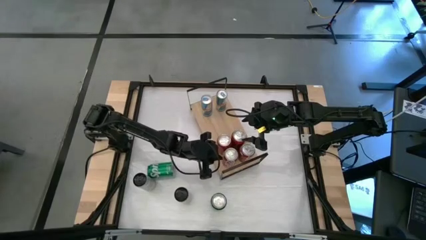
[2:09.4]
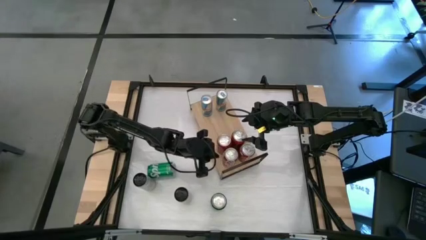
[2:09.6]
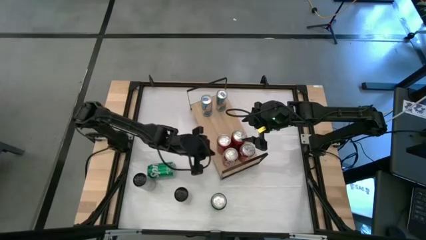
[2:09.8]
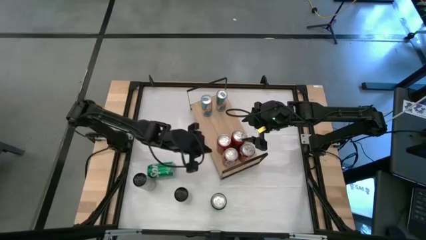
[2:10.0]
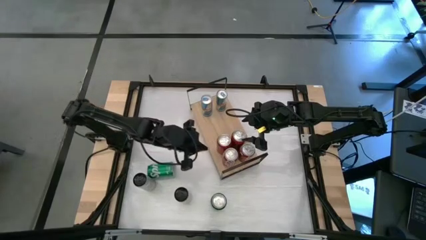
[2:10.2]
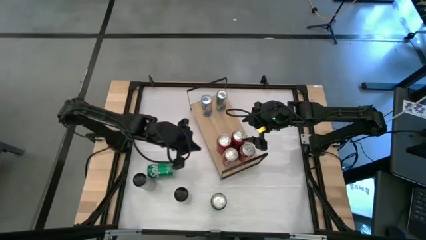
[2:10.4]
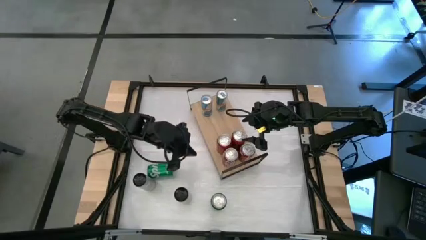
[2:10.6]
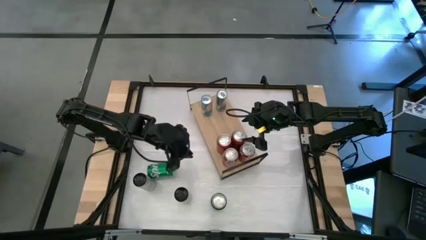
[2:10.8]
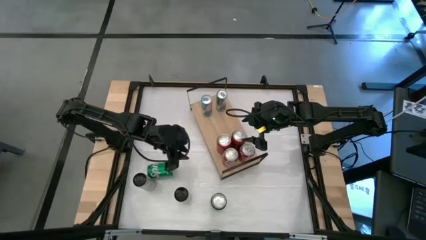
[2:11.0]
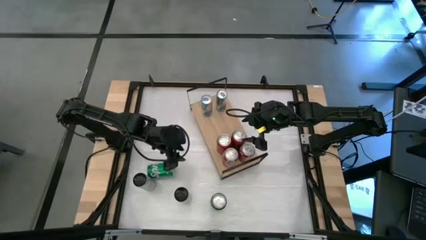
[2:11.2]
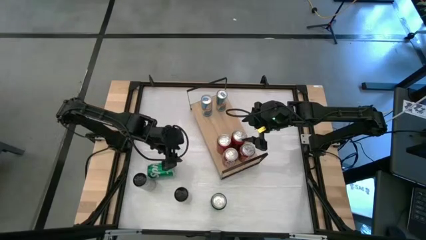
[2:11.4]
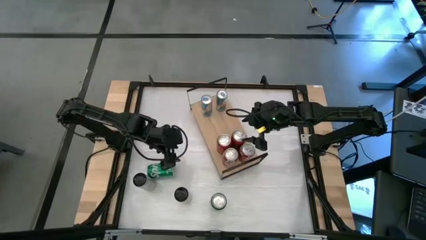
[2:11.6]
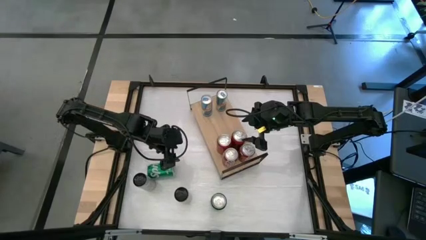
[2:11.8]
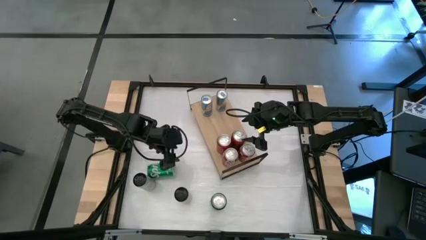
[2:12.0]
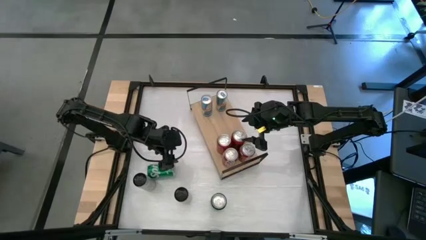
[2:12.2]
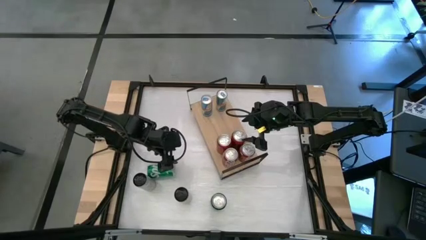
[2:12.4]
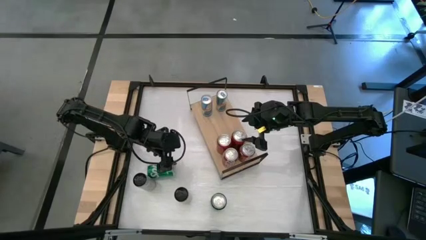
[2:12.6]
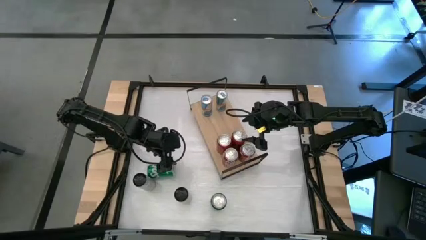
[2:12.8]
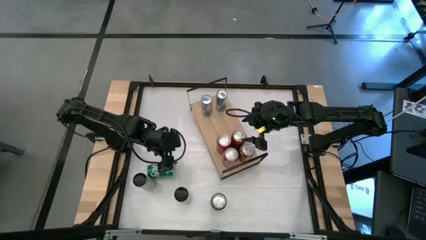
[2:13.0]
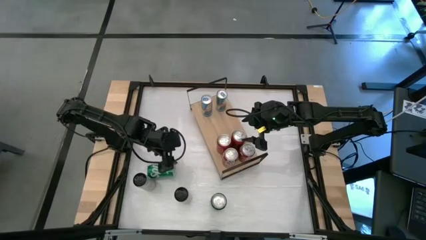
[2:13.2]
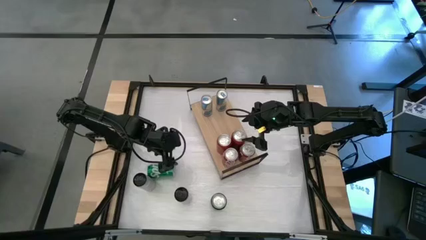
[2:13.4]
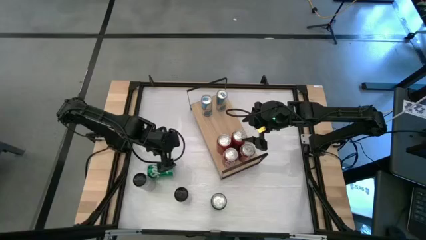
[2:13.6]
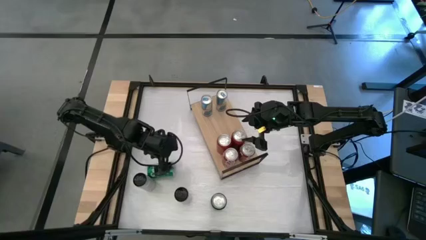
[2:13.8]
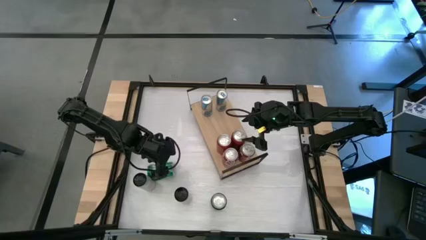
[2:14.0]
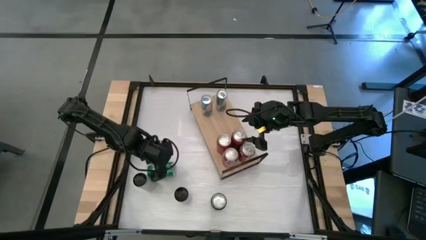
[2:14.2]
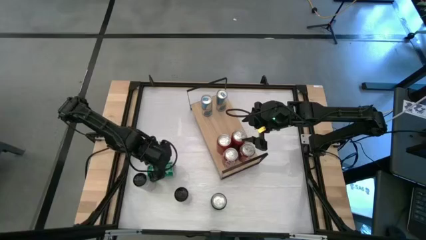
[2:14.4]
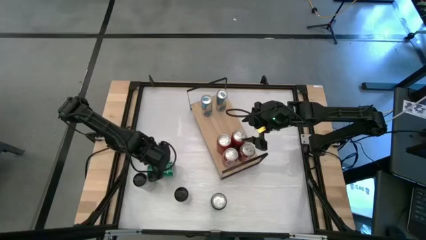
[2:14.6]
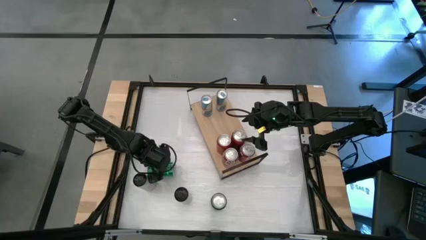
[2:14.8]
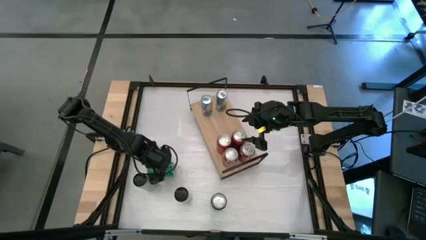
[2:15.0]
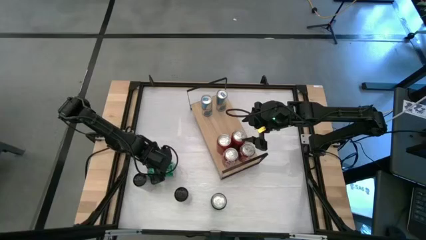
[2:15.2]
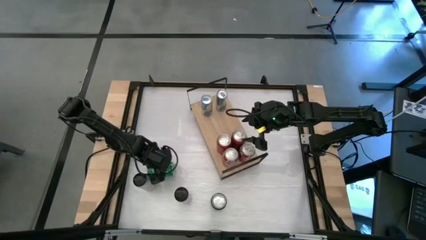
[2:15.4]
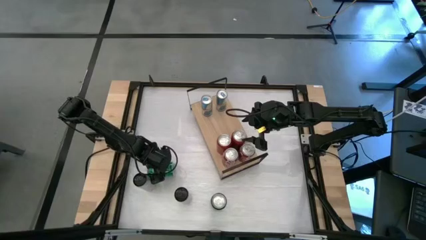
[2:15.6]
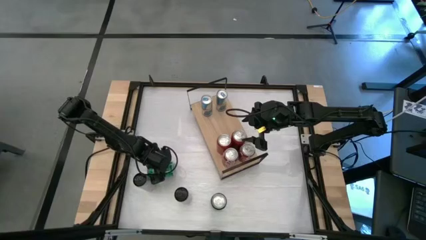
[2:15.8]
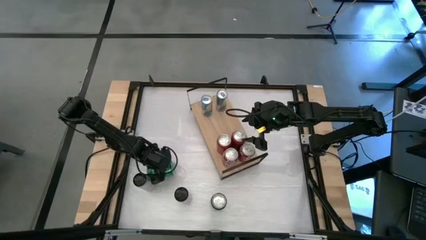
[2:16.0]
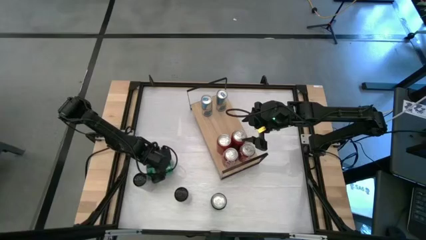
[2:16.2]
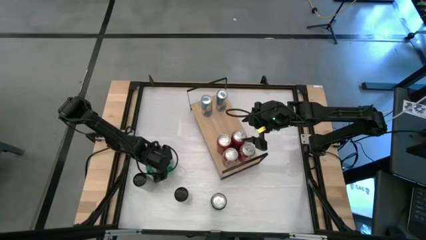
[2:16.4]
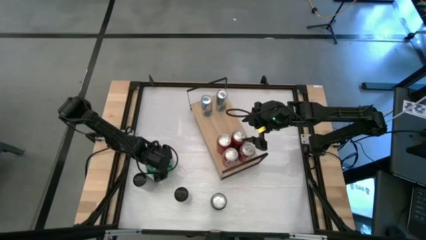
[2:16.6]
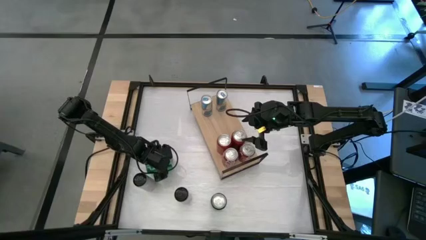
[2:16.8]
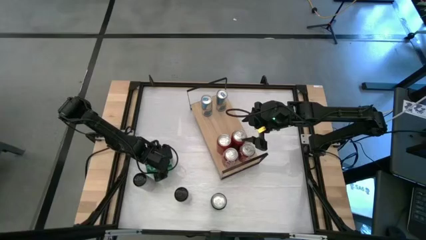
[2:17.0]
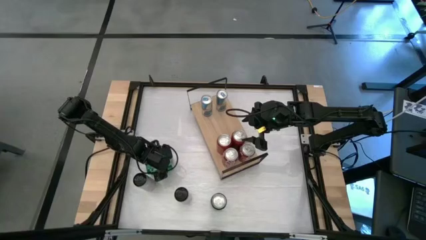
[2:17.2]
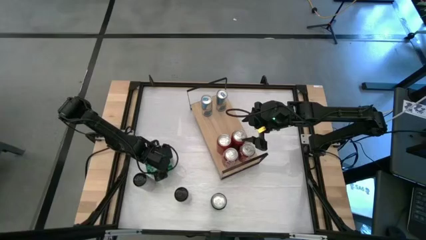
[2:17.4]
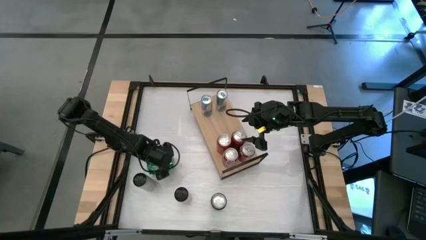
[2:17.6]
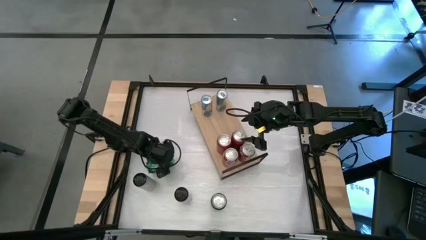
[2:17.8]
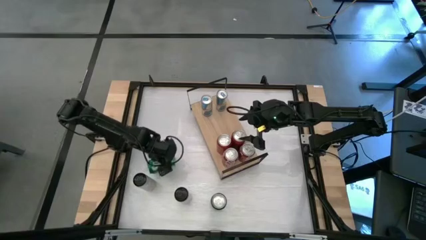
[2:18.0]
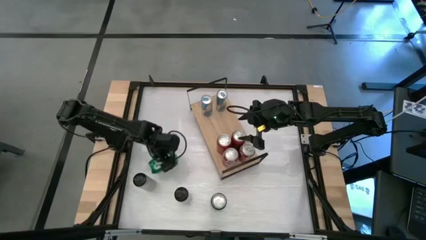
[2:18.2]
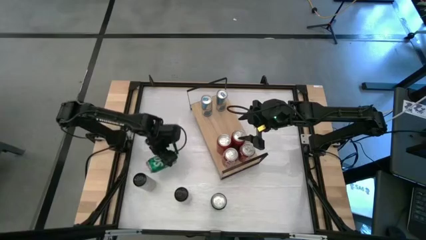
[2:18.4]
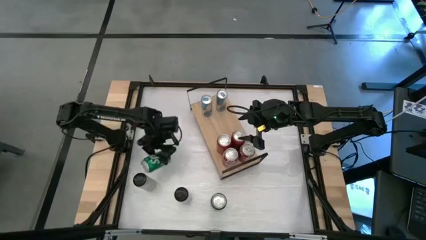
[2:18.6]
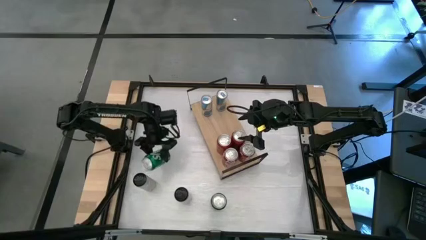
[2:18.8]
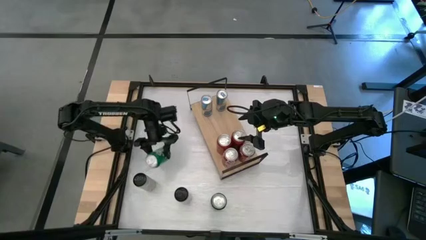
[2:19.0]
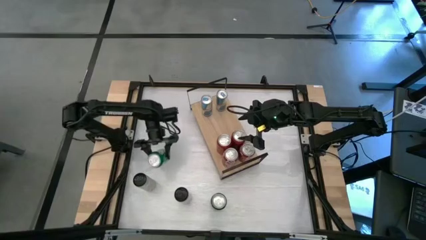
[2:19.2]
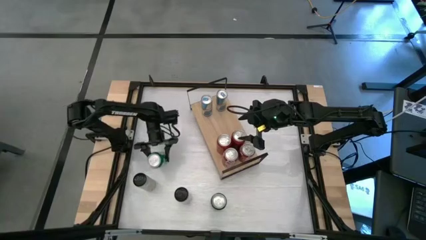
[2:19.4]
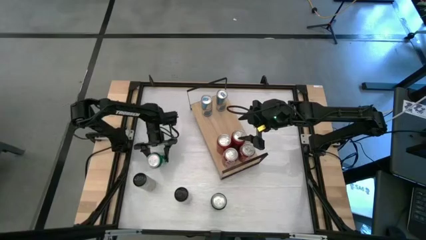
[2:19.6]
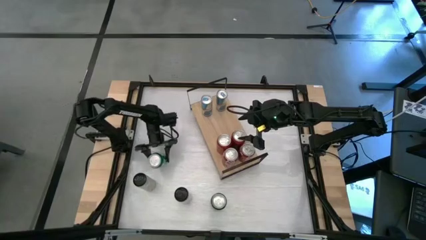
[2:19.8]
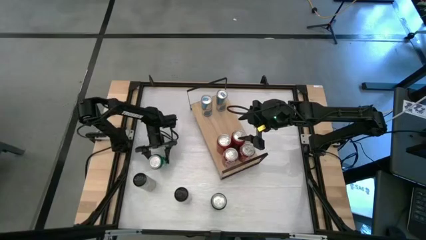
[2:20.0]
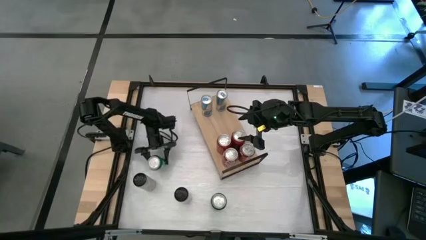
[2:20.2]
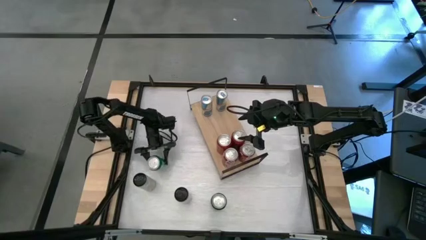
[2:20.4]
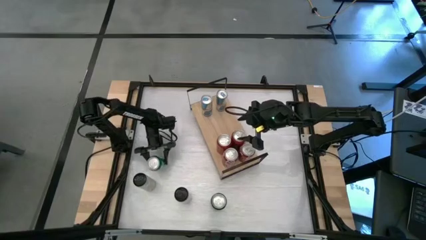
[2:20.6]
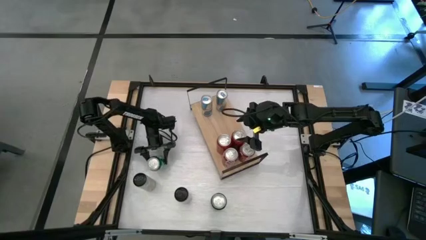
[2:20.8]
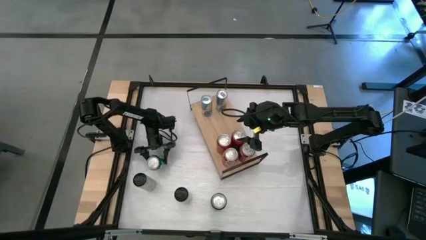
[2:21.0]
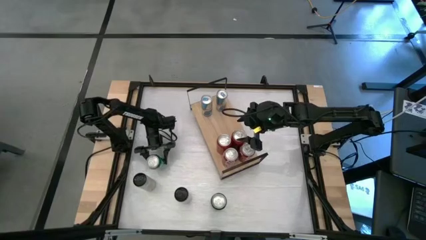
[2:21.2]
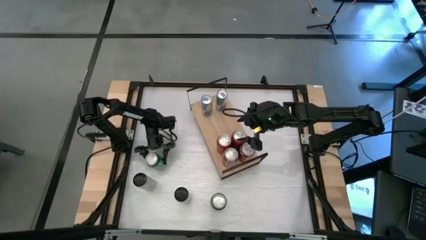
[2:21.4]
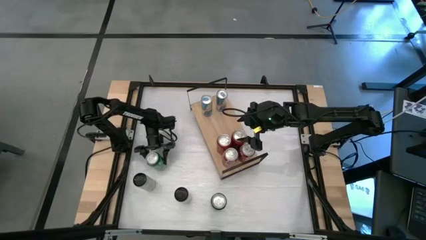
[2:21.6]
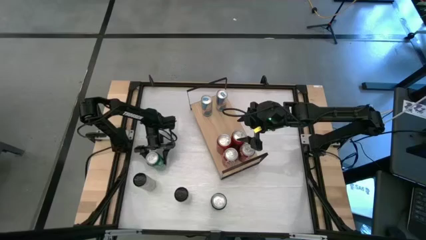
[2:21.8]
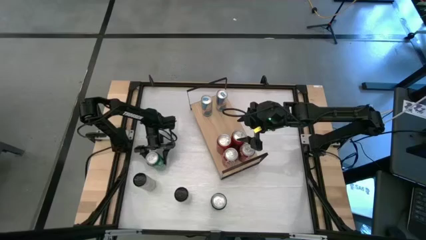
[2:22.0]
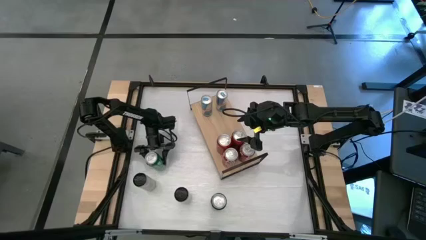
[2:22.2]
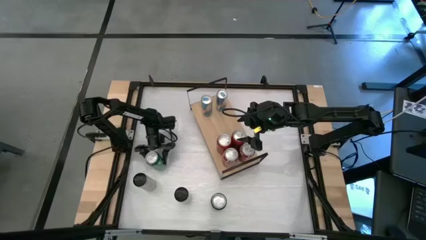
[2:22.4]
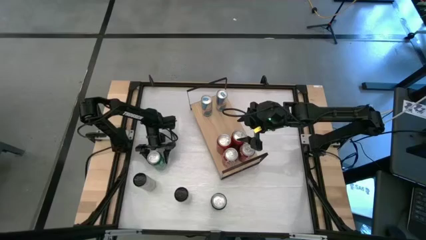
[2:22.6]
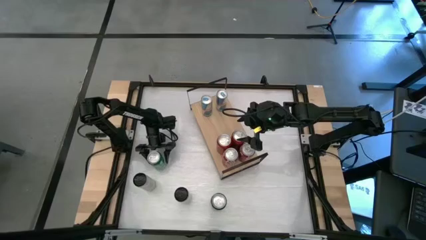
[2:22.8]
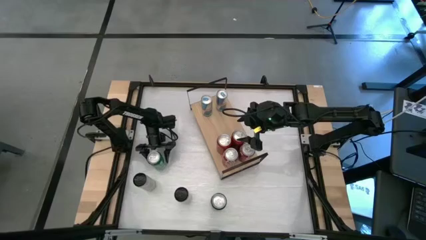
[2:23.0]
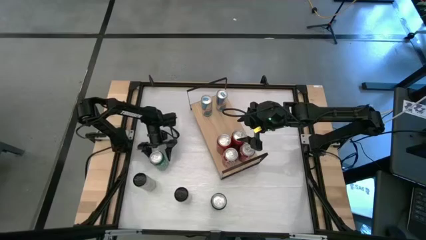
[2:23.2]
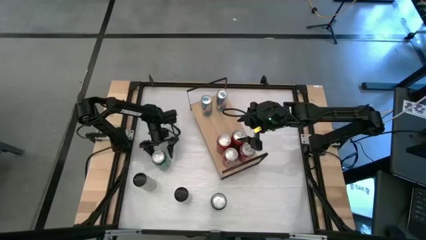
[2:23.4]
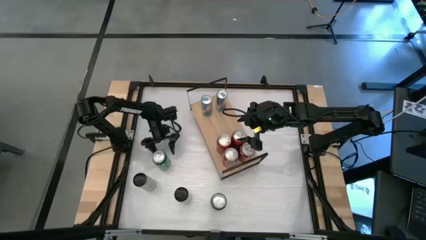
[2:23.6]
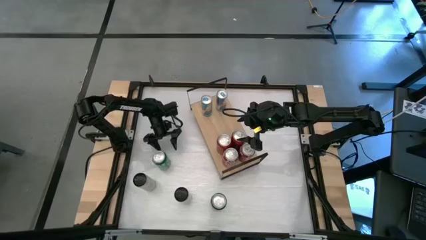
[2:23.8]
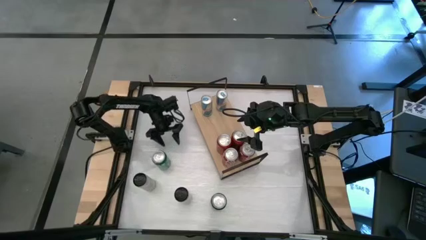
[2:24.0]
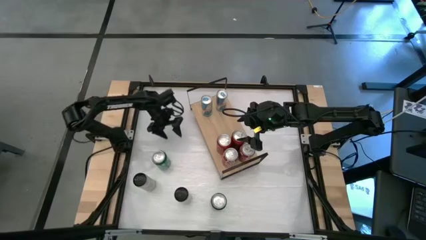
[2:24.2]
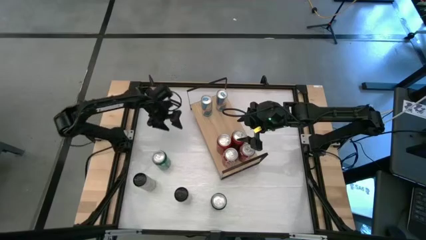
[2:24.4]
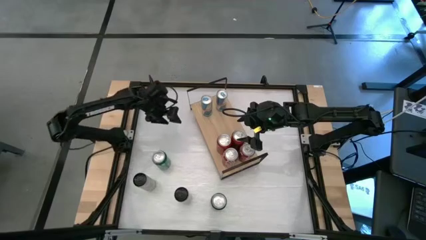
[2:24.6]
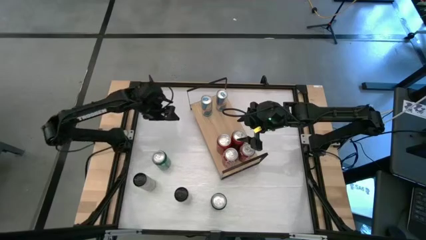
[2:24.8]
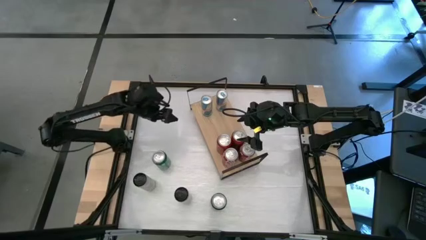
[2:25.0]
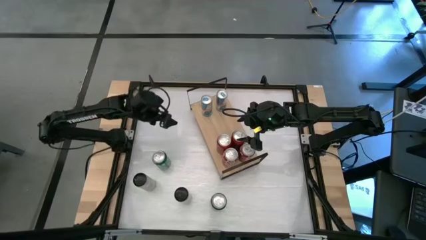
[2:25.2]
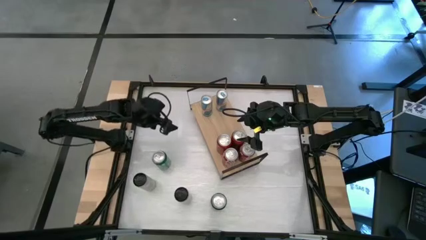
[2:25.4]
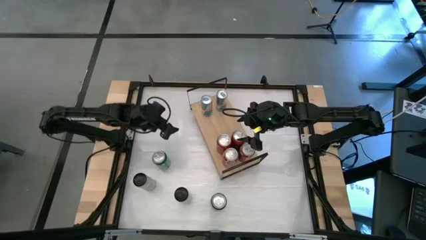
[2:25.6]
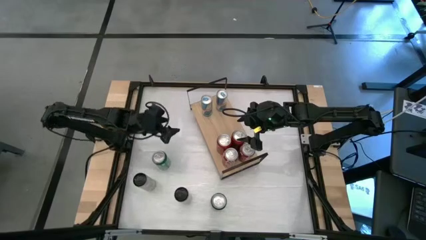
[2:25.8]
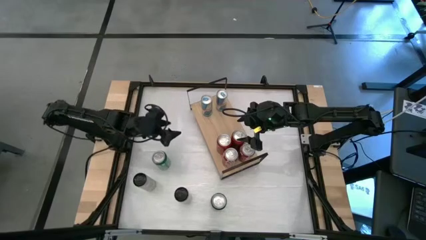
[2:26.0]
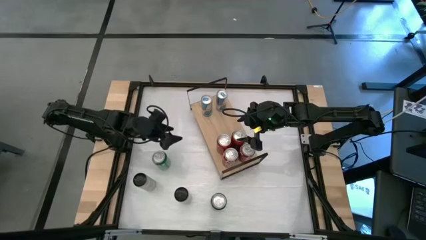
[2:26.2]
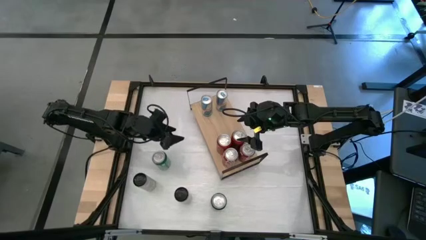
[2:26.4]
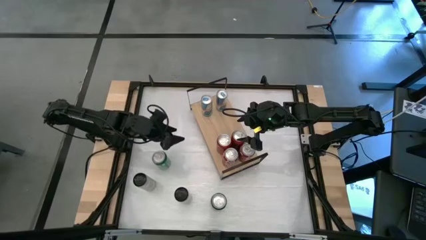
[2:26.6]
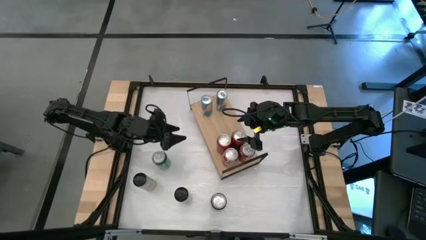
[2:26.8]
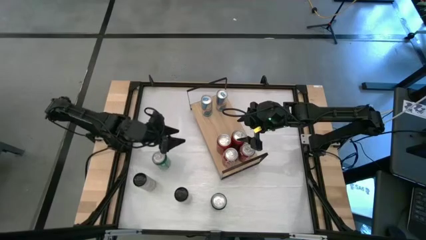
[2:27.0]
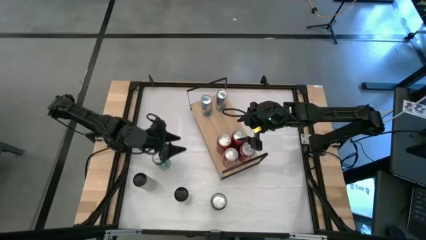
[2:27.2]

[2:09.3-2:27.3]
Task: Place canned beverage on shelf
Put the left green soda can on the shelf

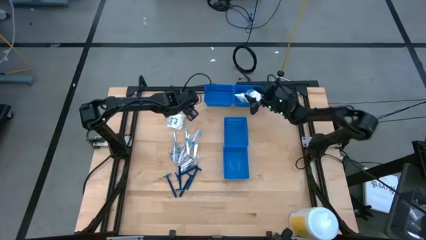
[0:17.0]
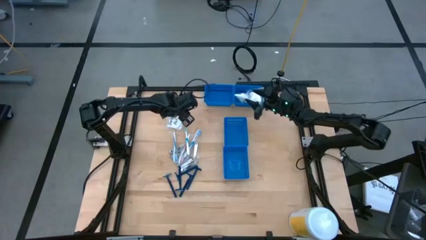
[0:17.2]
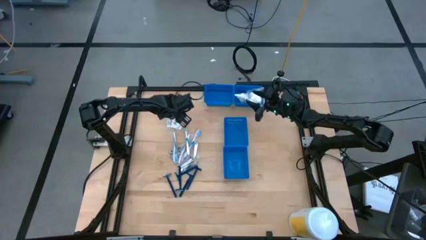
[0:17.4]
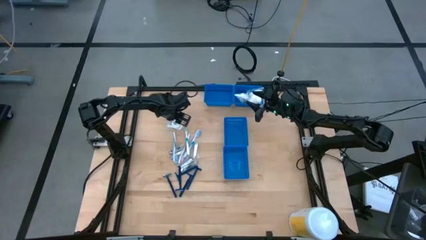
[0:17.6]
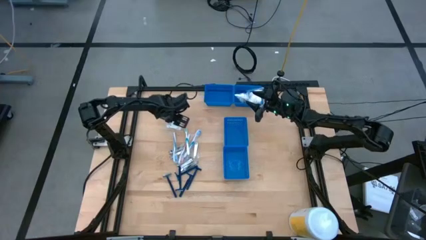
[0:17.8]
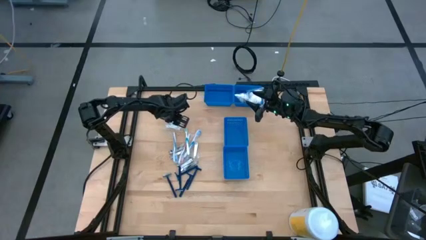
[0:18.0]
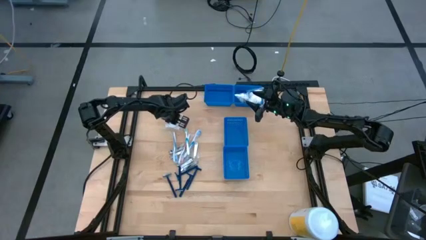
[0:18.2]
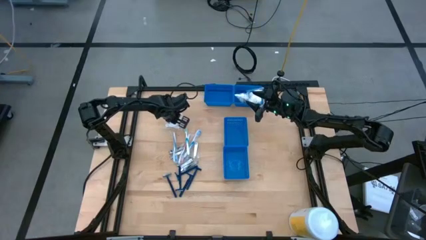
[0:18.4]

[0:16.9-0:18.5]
Task: Pick & Place Travel size toiletries
Put the cotton balls in the top right blue bin
